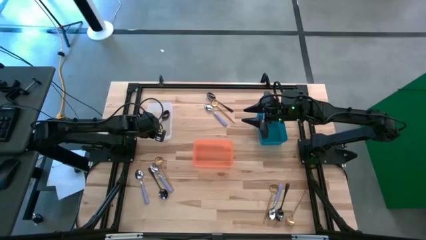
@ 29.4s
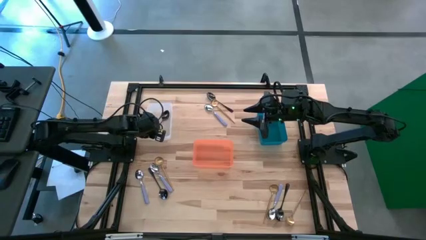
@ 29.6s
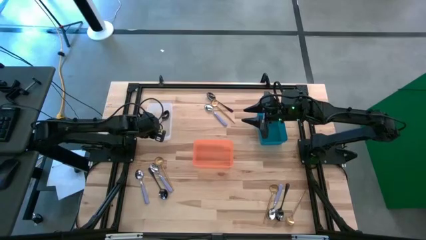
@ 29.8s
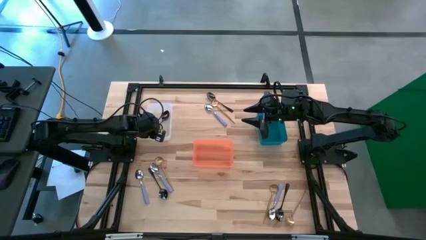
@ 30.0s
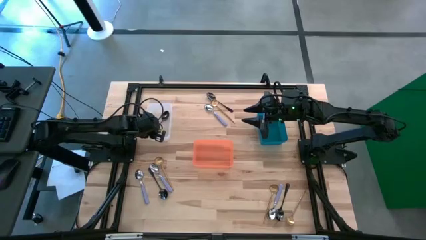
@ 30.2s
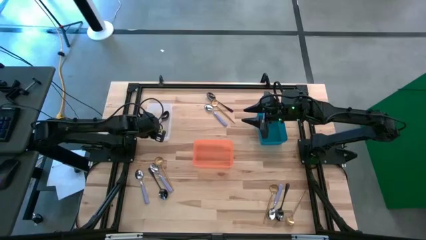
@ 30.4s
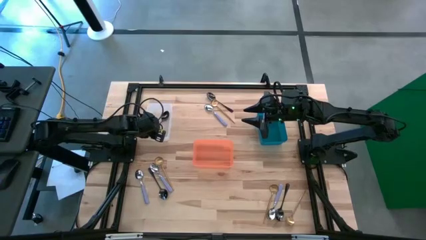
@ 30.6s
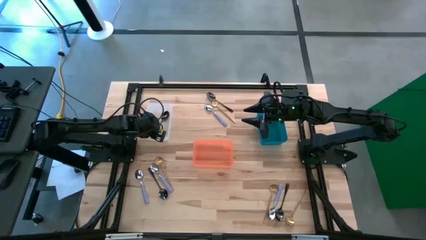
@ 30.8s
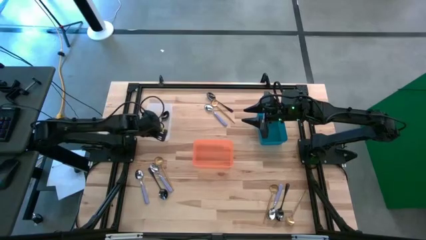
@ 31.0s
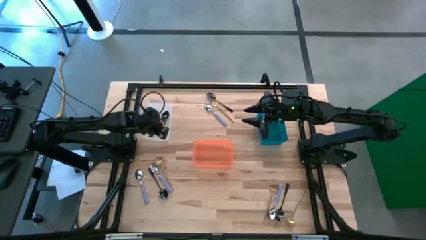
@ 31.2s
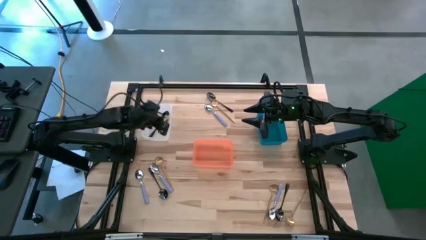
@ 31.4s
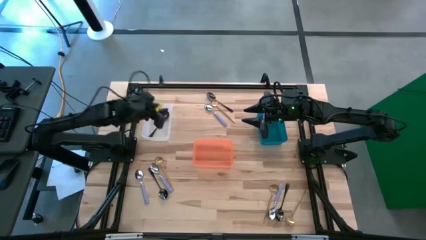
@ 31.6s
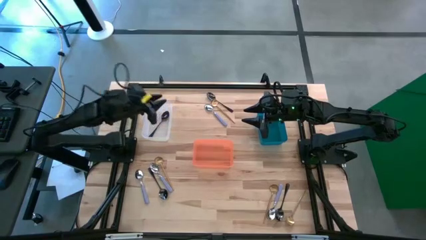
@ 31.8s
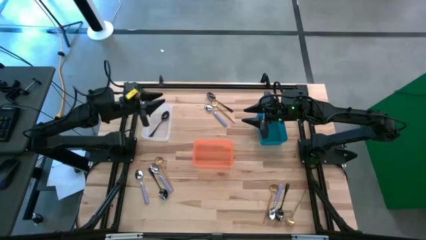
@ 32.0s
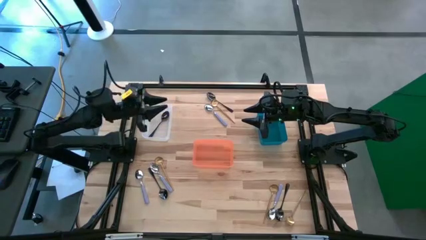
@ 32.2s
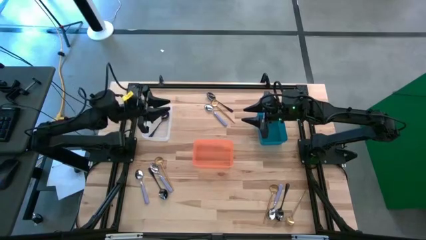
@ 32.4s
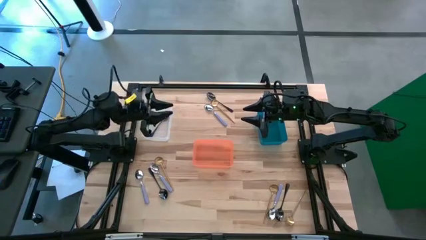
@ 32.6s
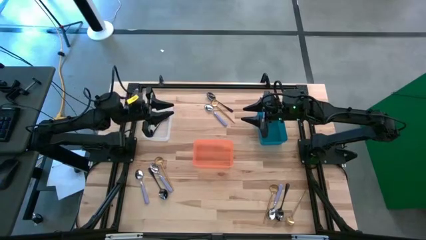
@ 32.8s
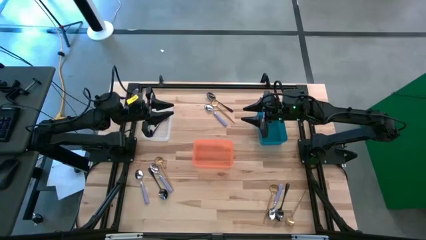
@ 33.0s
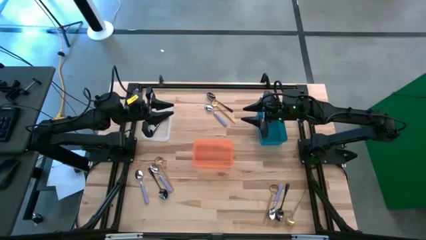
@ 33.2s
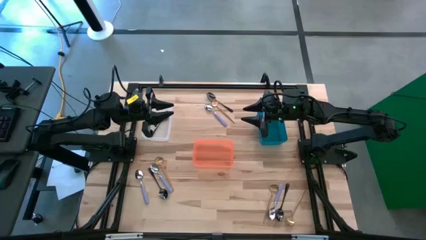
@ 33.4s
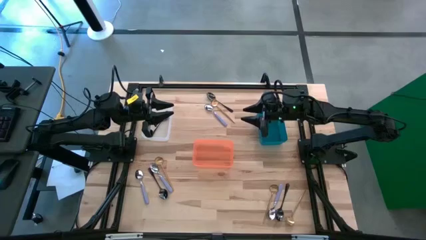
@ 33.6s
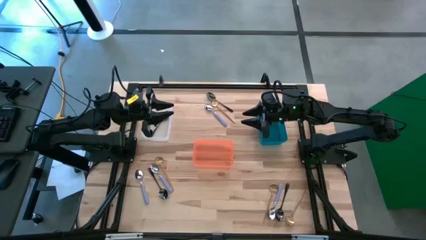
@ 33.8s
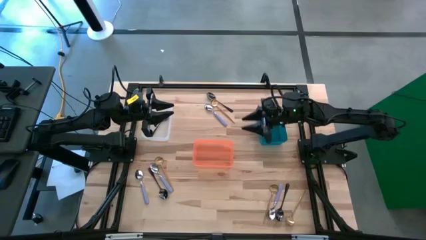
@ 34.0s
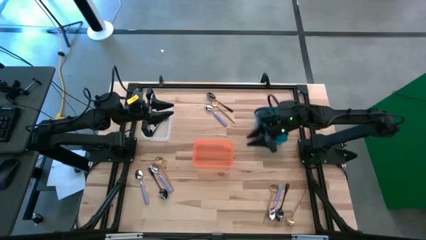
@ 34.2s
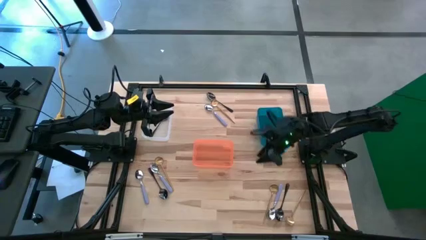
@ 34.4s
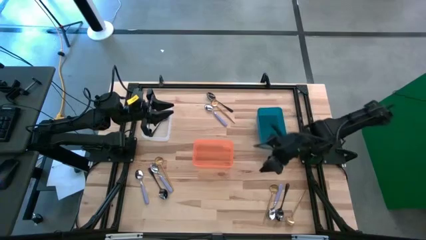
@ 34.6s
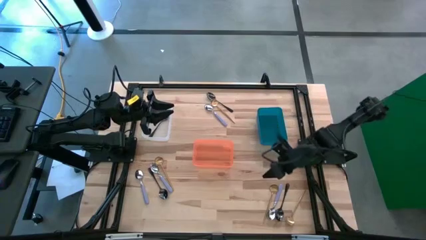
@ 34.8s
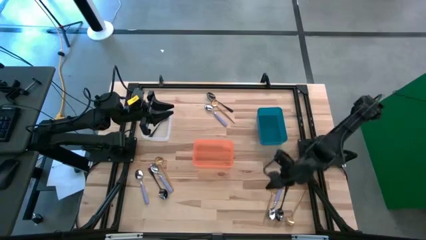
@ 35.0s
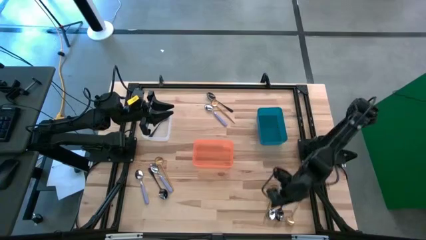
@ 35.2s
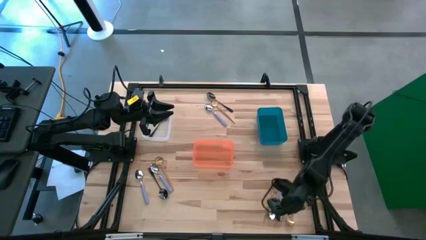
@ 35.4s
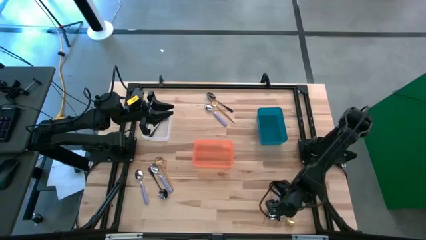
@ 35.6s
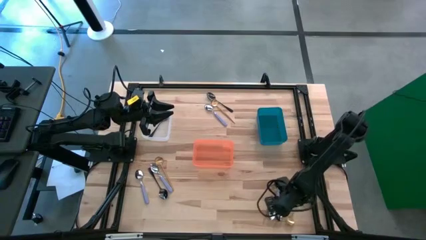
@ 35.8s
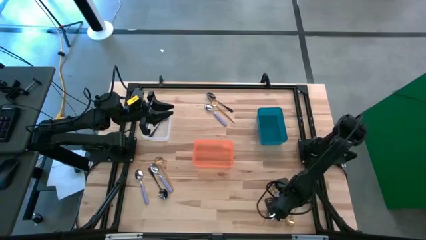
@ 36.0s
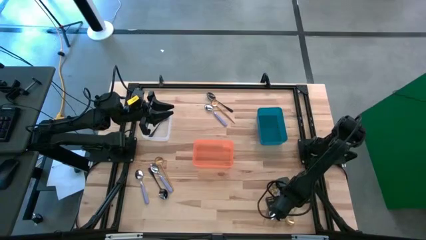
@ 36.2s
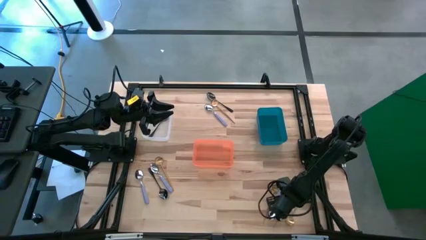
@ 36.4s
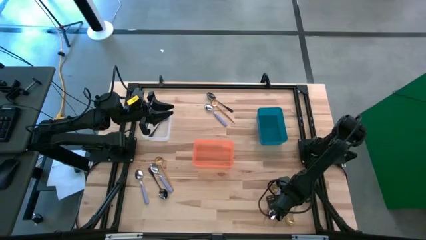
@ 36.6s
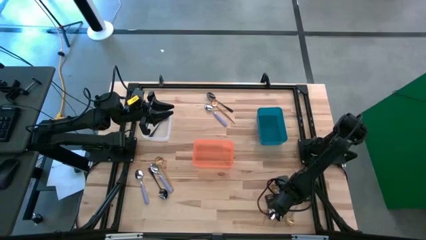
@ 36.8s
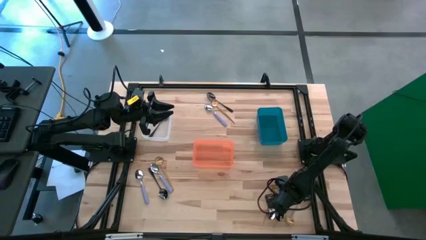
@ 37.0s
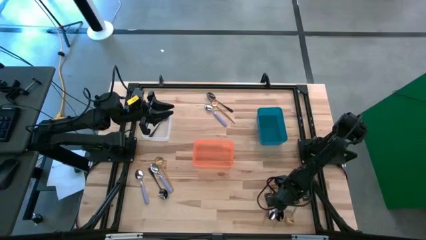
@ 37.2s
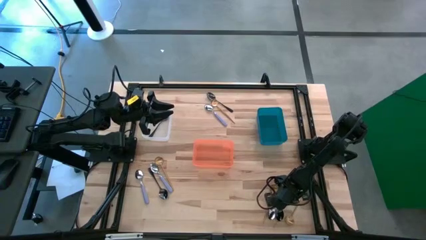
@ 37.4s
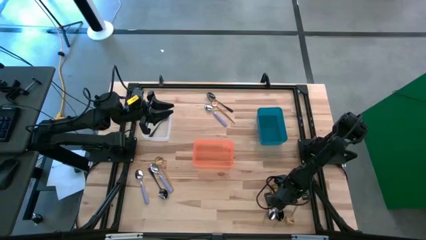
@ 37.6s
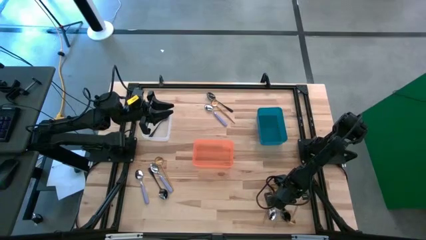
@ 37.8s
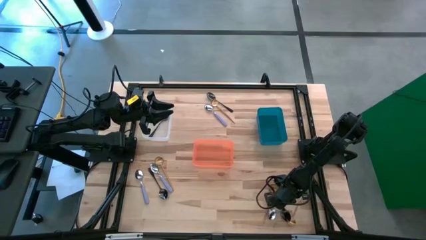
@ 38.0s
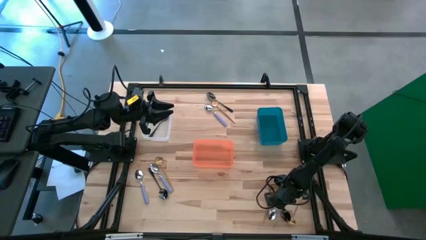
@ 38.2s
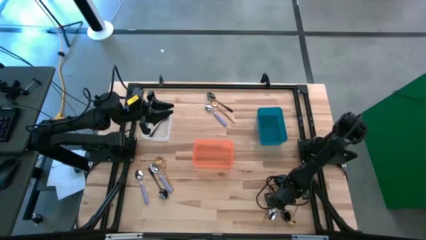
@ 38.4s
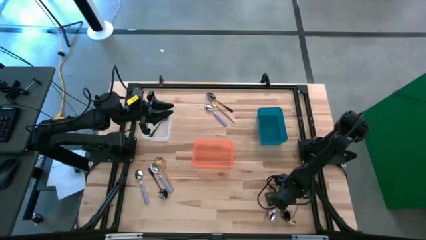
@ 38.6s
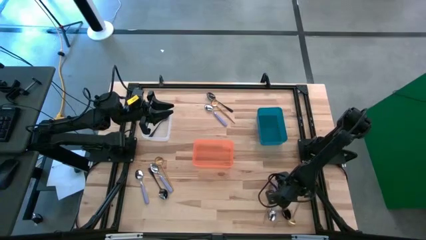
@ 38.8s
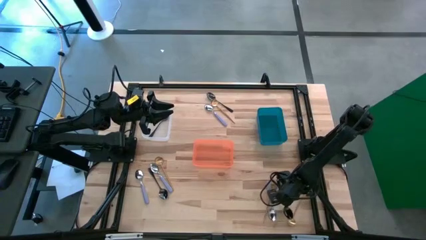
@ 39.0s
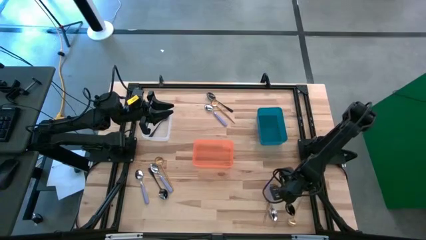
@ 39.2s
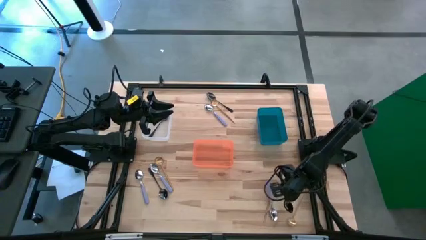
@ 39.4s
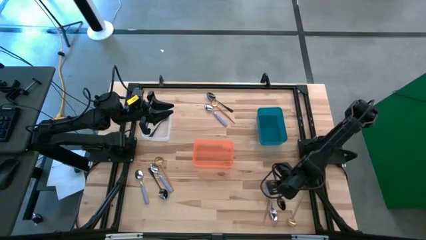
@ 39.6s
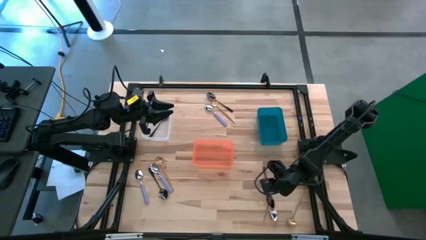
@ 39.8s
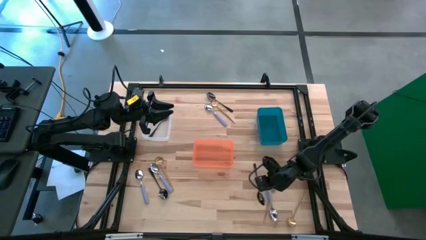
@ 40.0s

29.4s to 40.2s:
Task: Sort silverware by color (type)
Put the right black spoon into the white bin

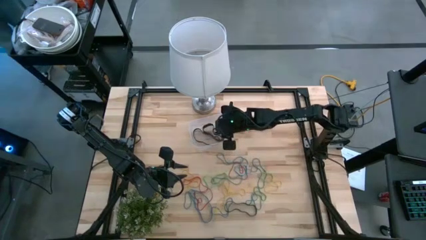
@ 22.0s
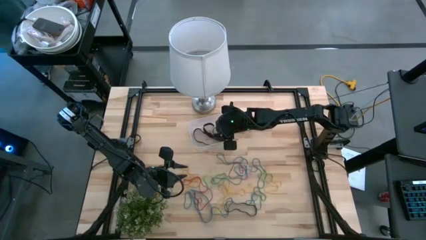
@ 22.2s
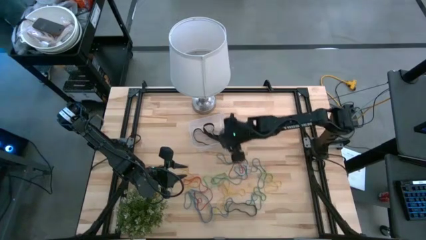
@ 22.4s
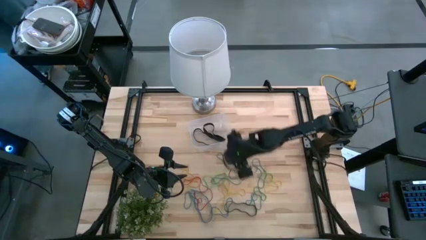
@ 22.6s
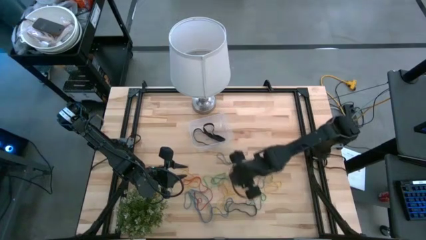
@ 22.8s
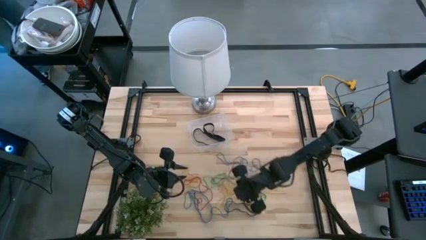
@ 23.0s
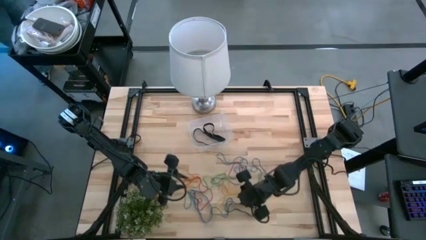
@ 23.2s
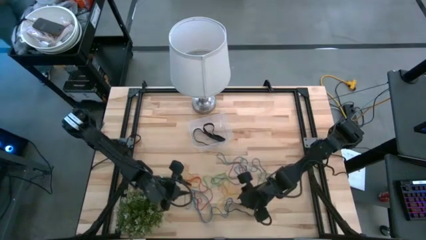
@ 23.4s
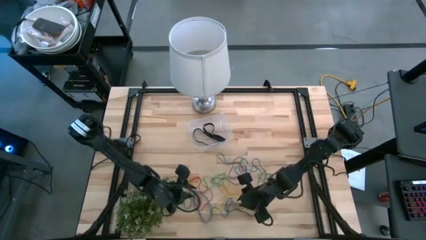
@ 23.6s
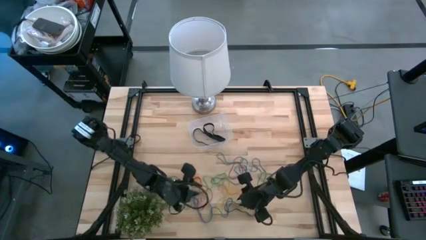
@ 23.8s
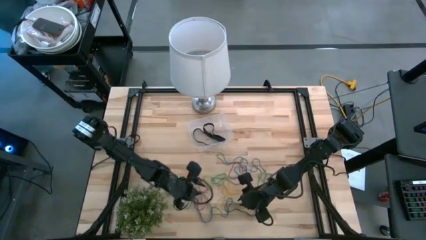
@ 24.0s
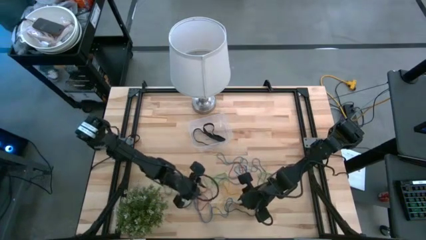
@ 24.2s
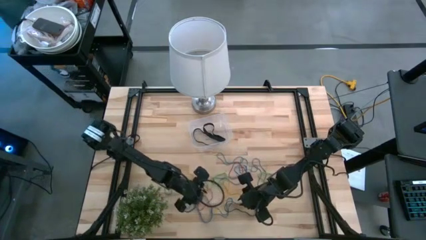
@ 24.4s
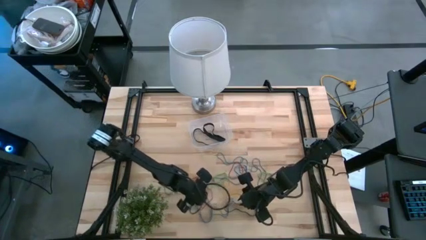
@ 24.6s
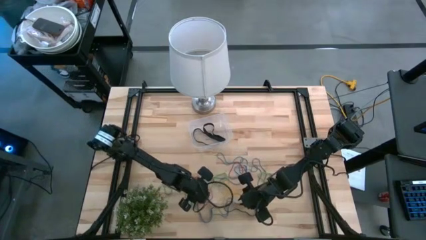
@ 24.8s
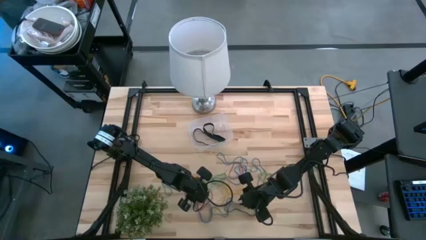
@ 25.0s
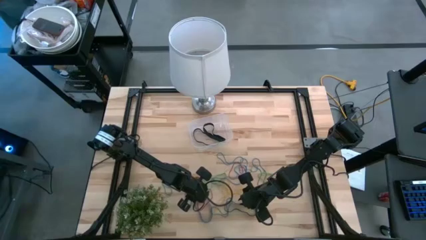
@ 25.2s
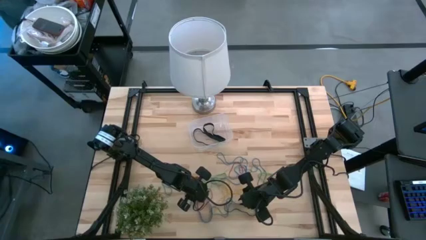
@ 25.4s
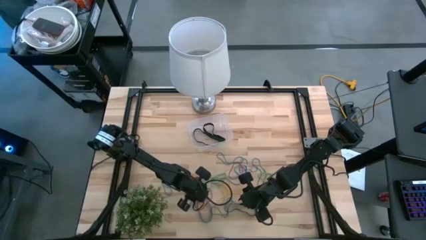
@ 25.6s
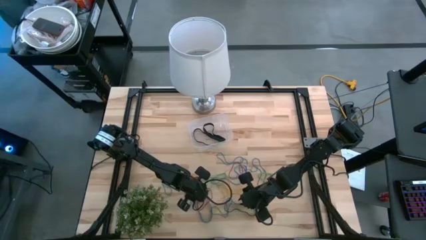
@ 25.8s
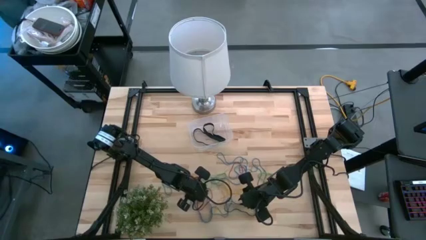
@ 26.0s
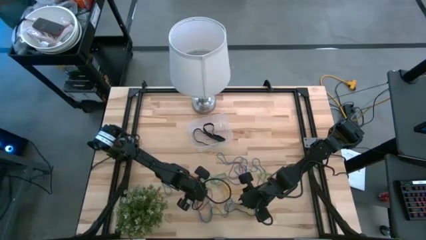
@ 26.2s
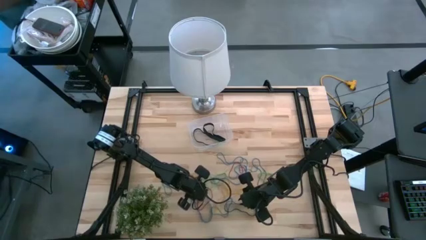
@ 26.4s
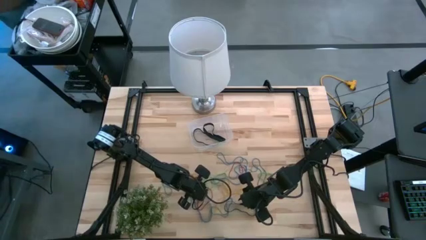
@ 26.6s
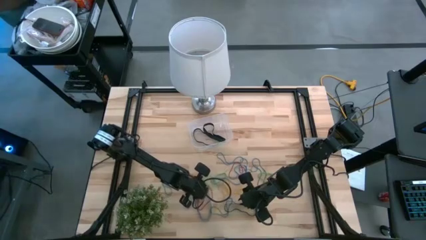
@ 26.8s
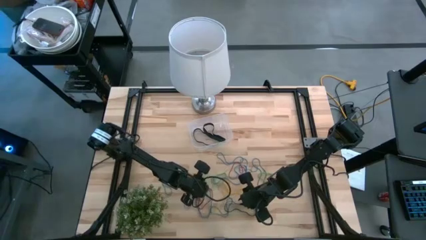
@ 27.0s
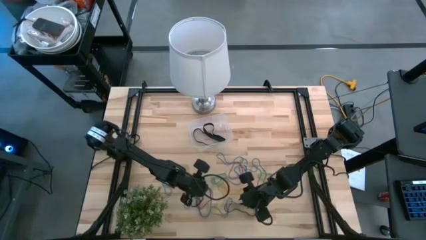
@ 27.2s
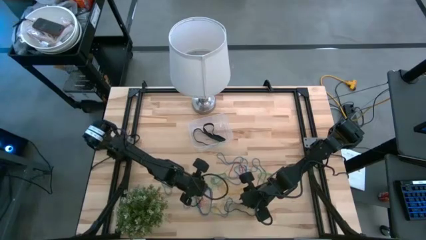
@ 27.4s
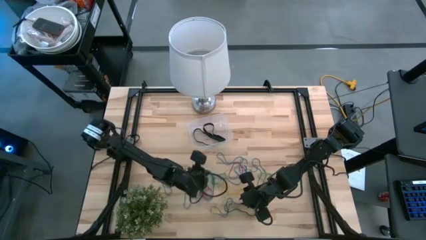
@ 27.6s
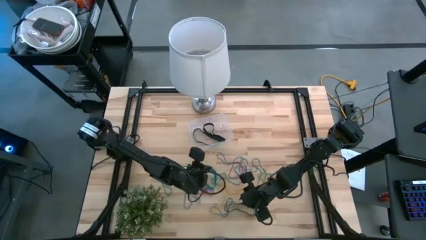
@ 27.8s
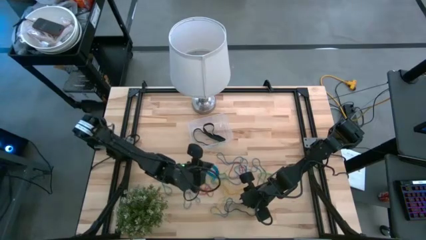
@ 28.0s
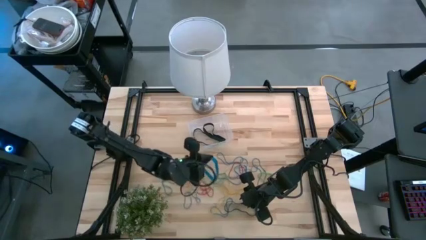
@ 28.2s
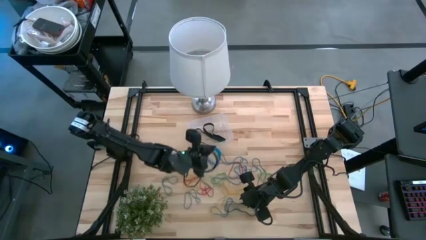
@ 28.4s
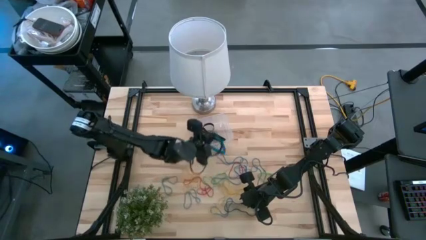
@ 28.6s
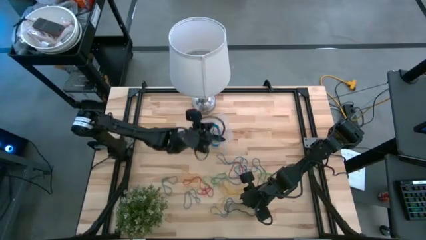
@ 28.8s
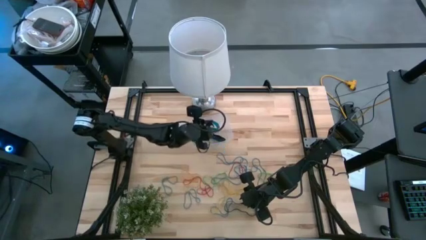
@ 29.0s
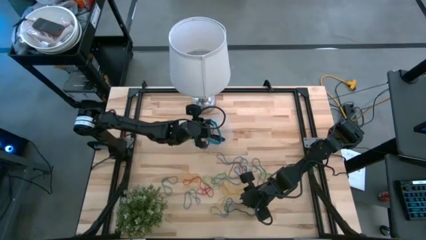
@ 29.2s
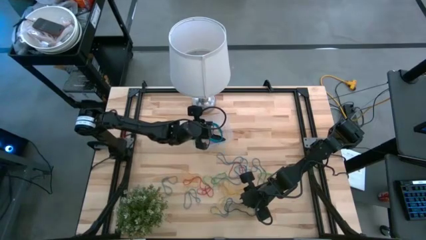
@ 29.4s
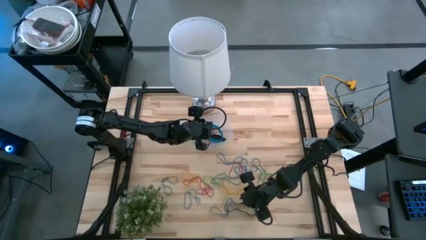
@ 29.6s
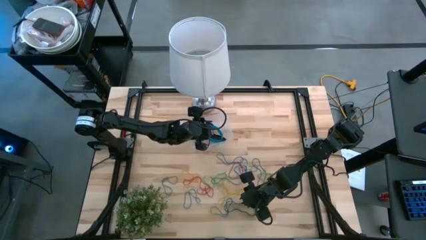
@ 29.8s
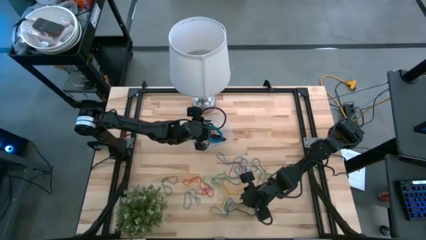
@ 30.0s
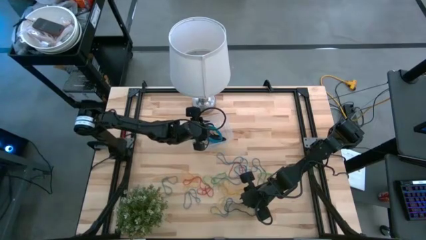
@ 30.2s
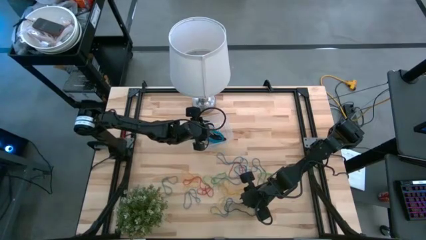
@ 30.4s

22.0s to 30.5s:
Task: Pick and place rubber bands into bin
Put the blue rubber band into the transparent container
